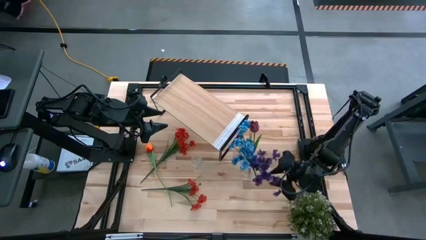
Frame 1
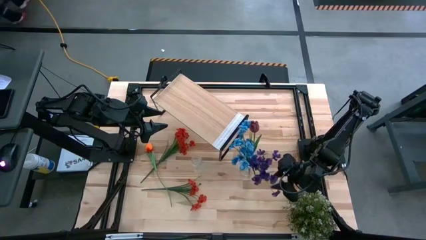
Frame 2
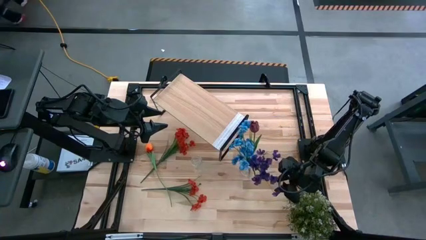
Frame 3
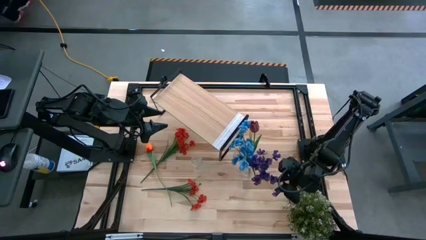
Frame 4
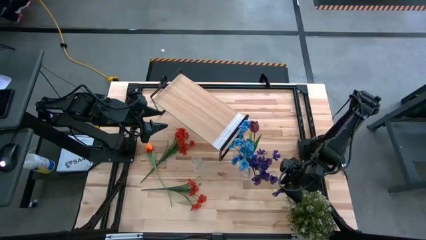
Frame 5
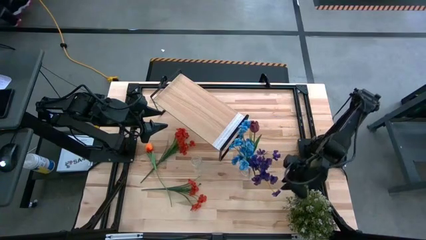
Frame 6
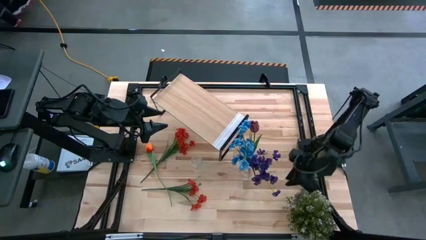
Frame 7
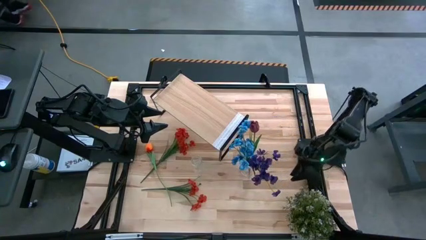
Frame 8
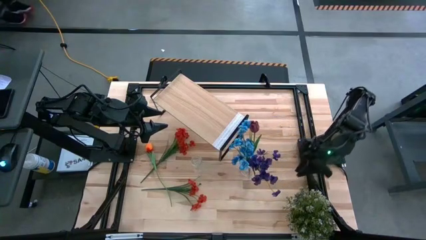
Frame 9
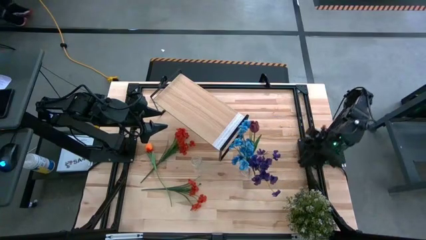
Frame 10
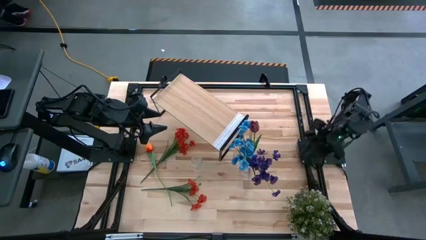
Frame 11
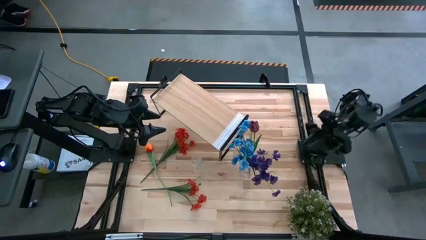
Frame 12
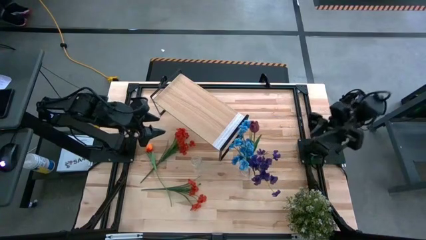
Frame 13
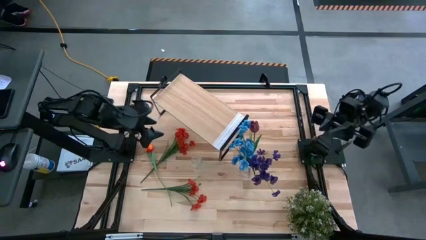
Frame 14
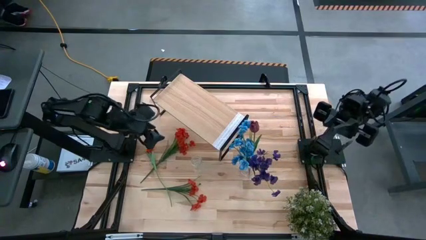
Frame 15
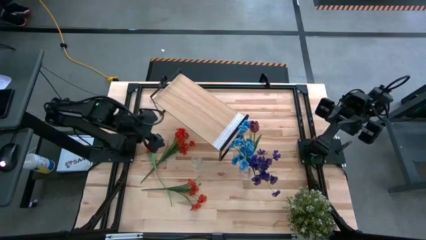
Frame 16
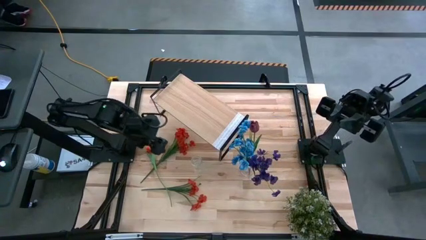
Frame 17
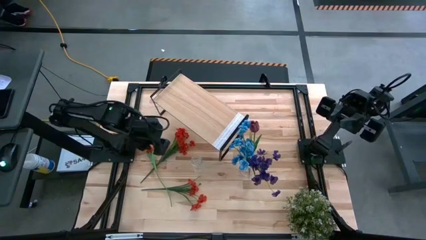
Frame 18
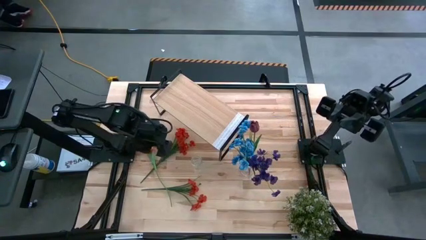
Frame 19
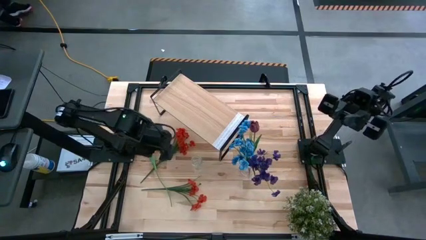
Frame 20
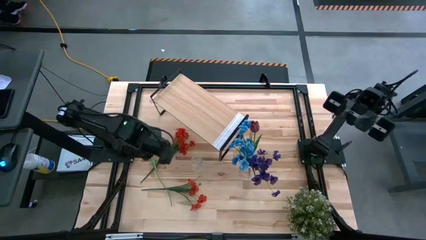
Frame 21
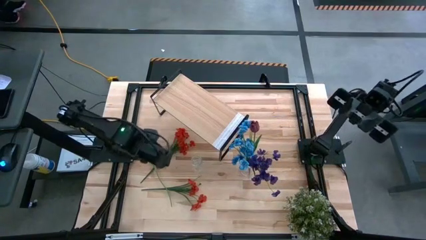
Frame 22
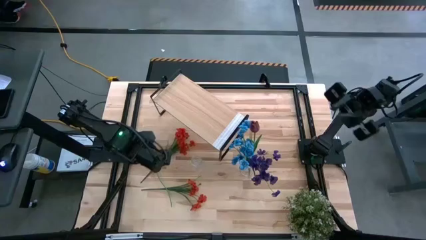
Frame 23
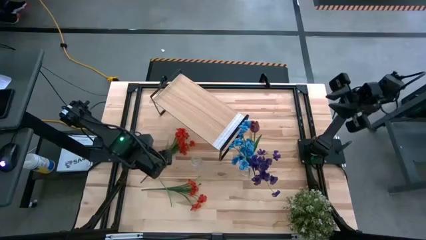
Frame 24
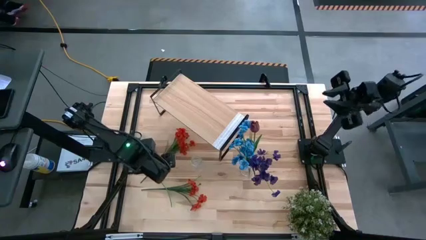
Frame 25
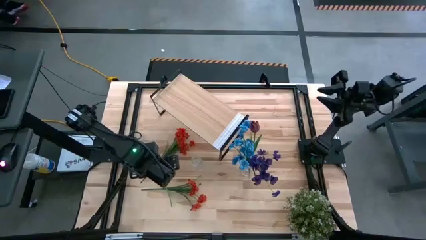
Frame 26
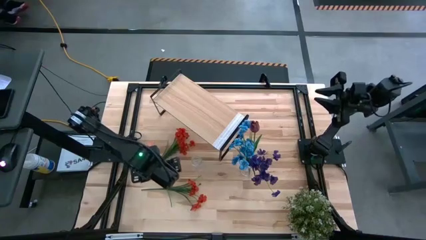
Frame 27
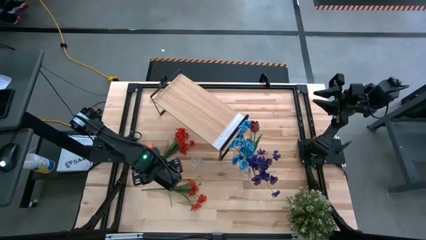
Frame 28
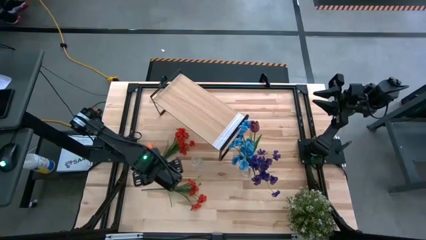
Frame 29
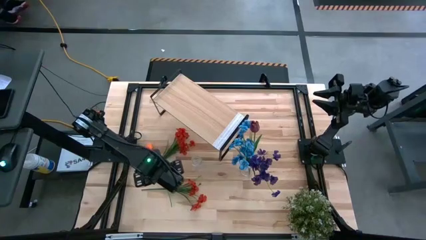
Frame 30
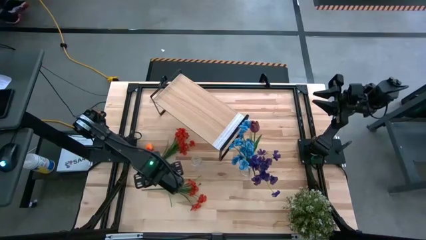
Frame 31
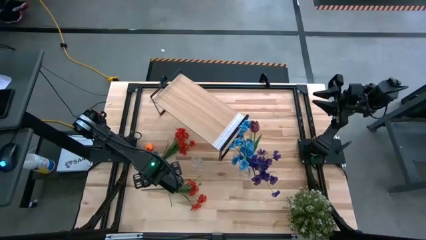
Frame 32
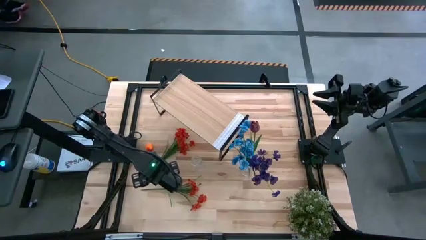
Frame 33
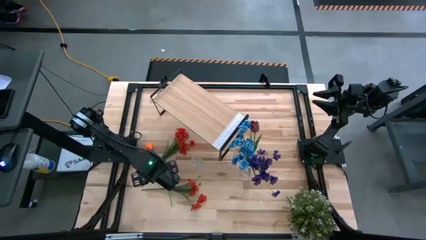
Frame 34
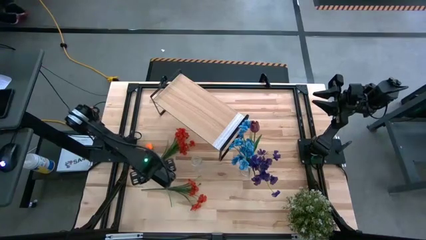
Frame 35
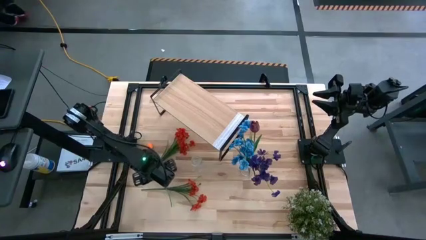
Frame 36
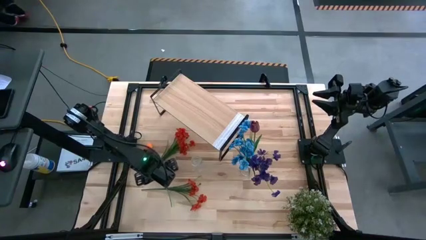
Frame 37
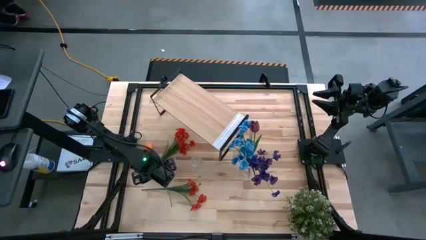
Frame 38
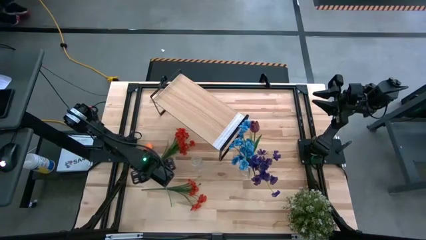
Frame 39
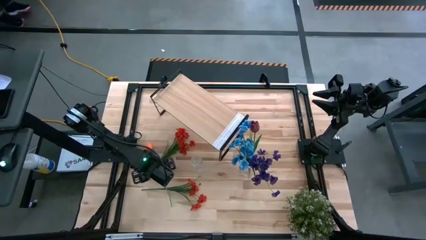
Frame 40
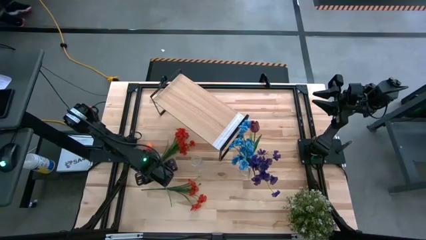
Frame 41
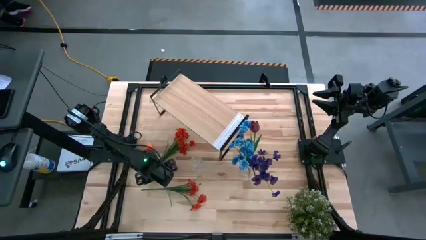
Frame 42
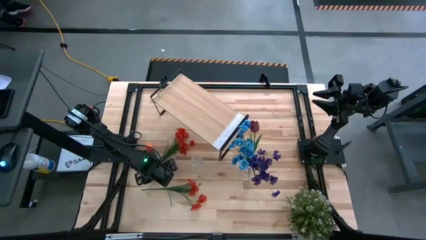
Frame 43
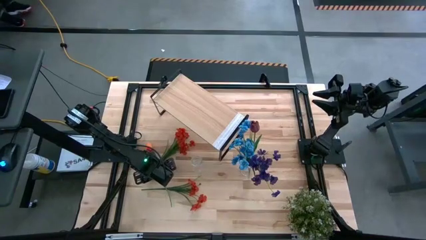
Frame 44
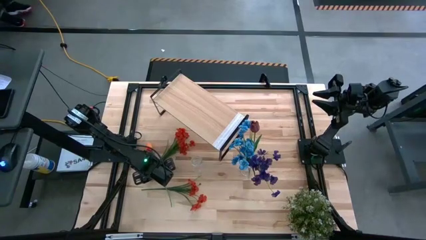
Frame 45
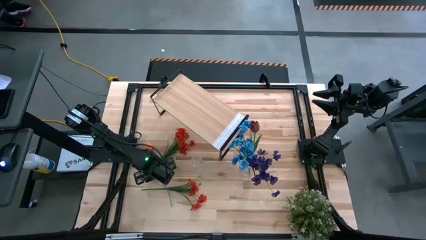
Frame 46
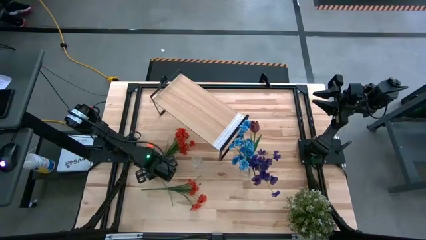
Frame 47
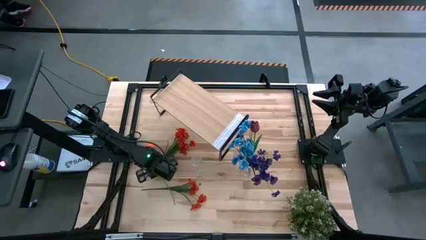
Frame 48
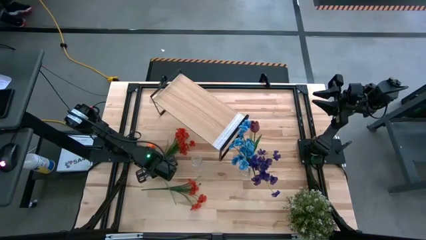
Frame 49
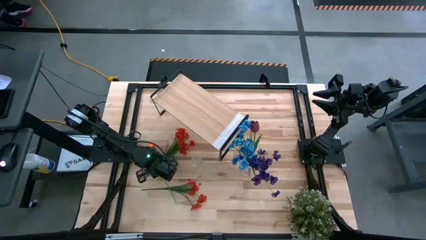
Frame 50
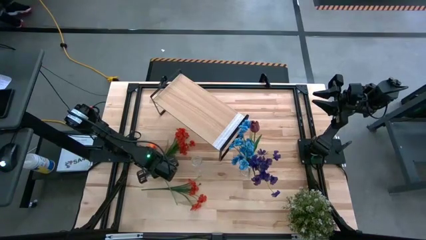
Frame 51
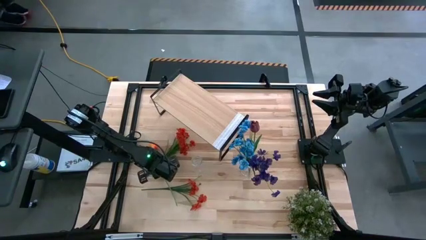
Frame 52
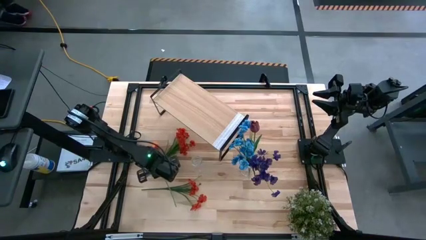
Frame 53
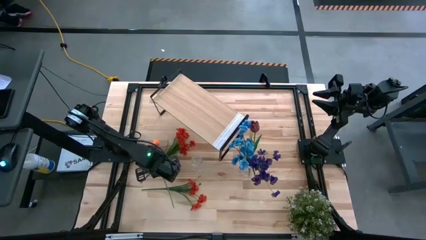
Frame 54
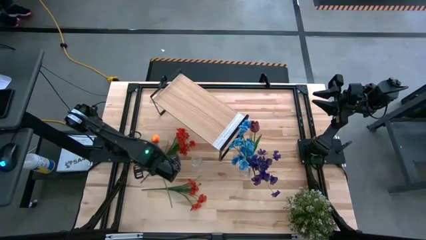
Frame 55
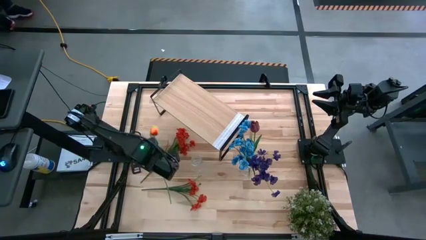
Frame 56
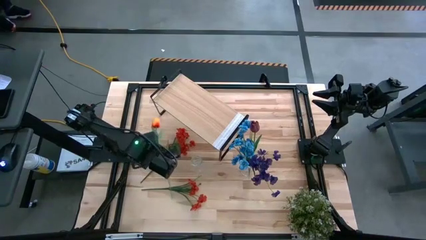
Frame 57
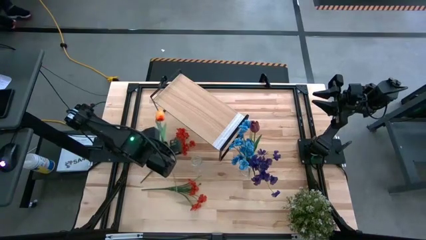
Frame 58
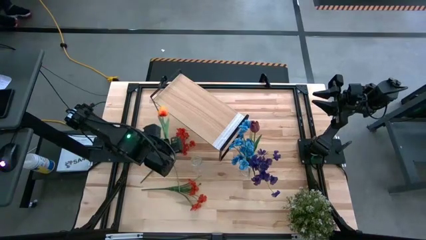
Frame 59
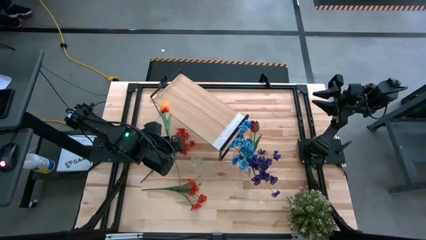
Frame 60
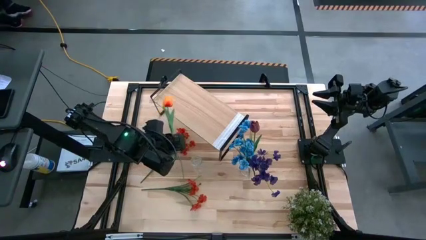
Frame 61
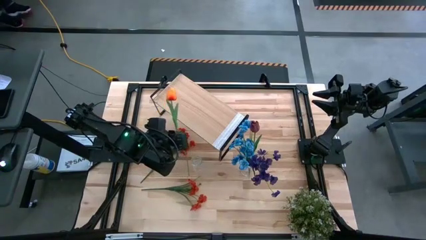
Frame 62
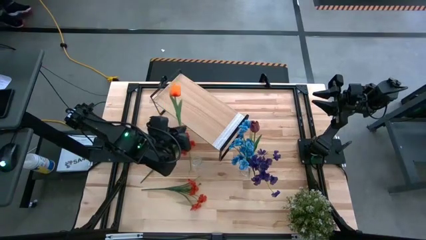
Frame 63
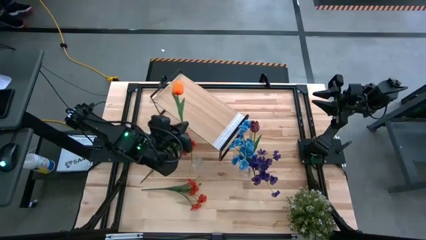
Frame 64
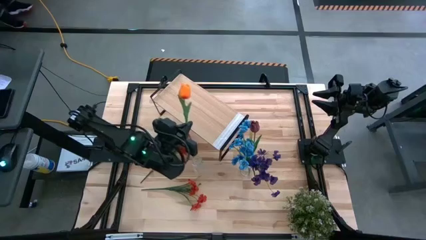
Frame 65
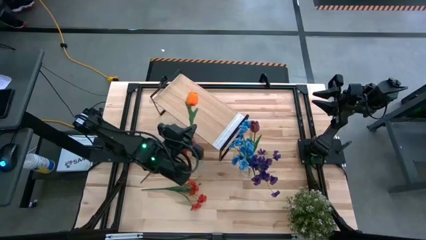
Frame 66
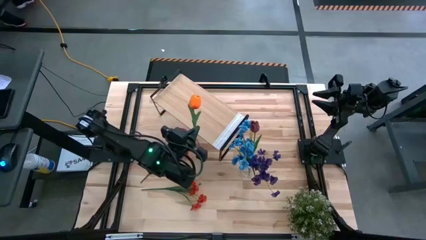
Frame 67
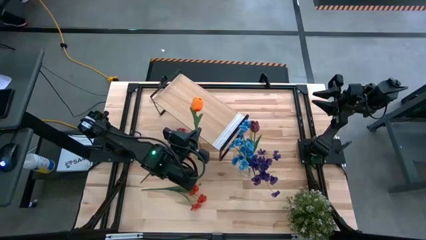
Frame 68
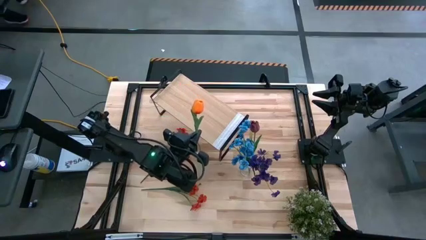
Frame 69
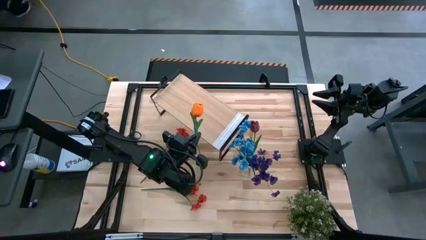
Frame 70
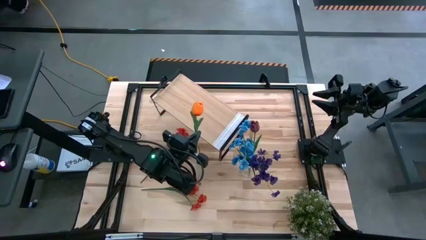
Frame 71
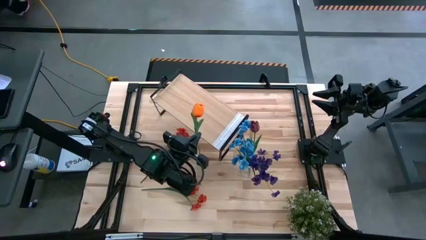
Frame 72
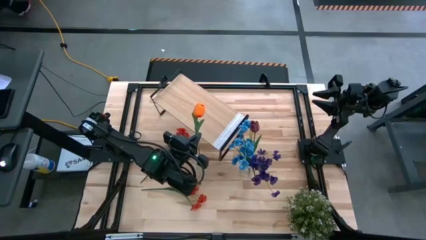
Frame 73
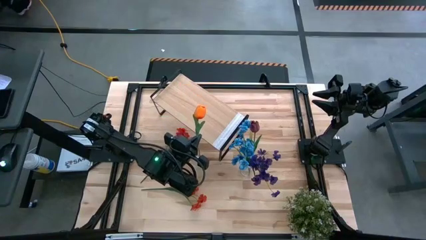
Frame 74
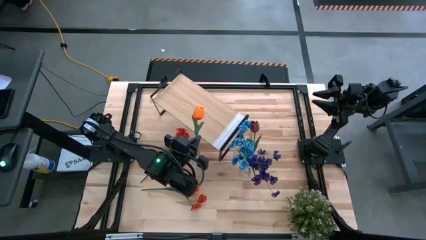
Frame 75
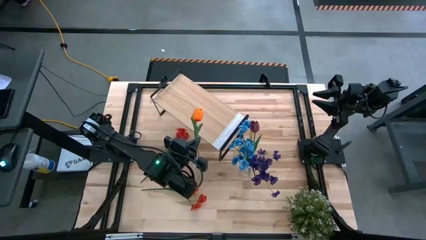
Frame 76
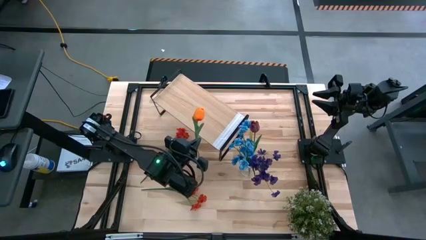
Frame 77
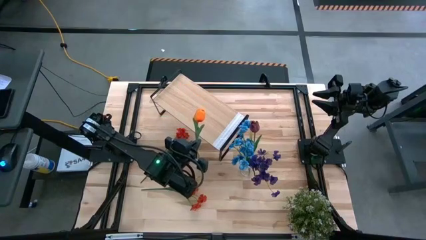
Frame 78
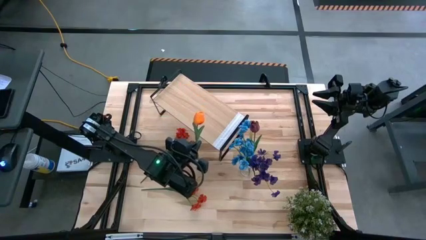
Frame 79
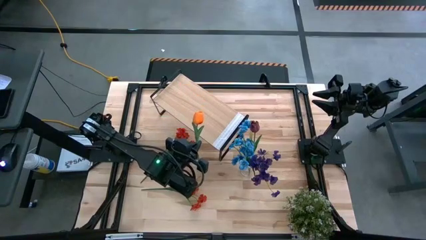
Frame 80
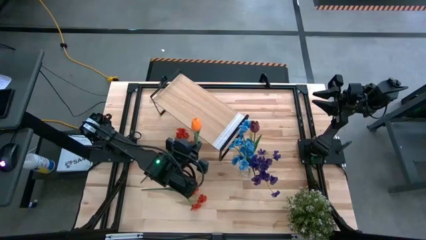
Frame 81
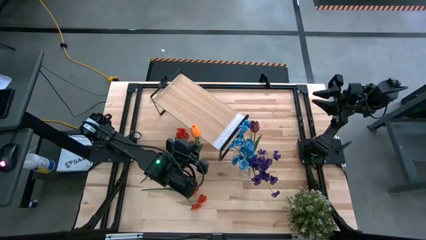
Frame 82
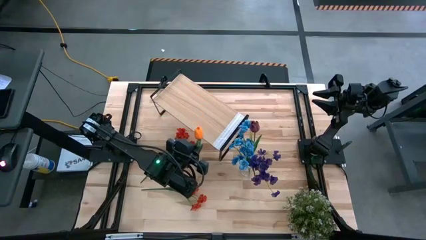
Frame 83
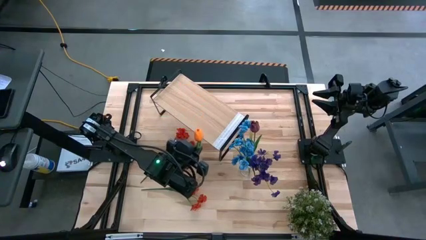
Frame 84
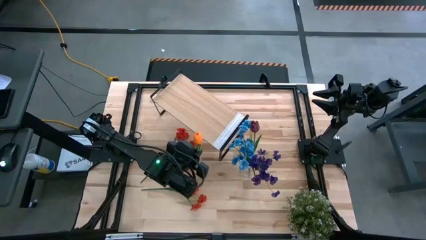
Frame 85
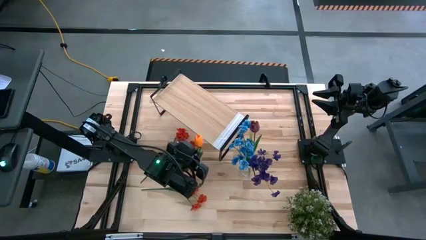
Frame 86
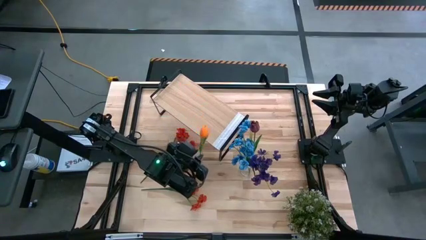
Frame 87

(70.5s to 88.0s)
Task: Pick and place flowers into a vace then onto a shelf
Put the orange flower into the left transparent vase
